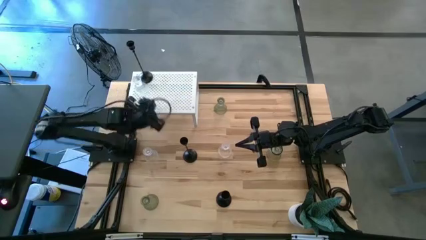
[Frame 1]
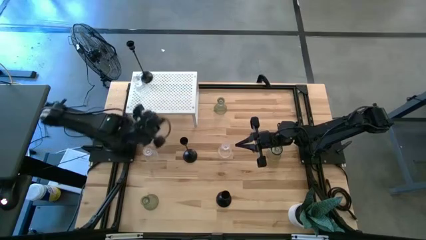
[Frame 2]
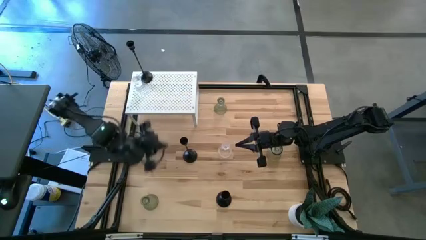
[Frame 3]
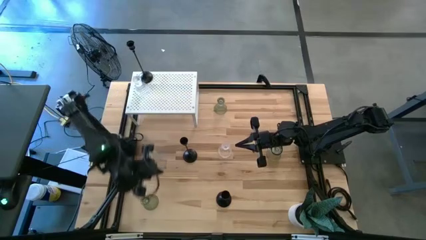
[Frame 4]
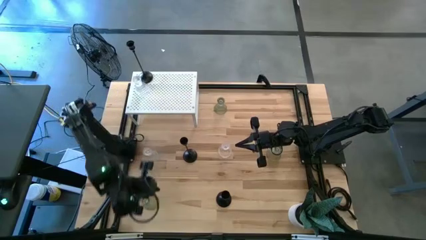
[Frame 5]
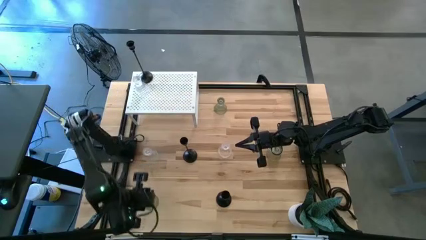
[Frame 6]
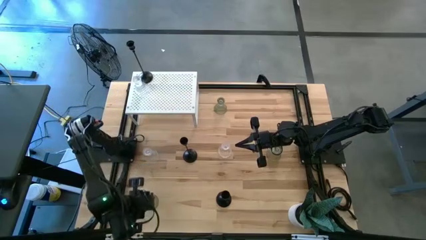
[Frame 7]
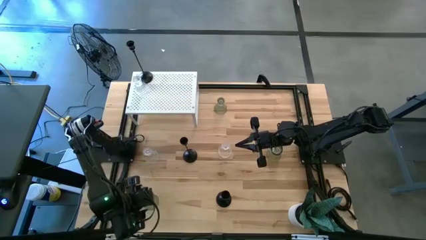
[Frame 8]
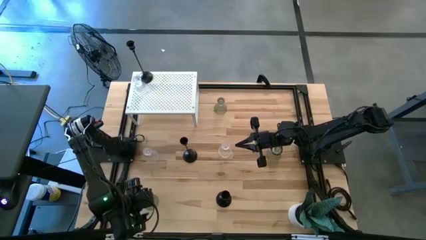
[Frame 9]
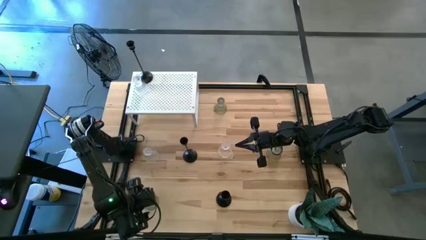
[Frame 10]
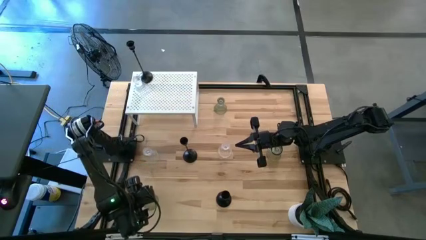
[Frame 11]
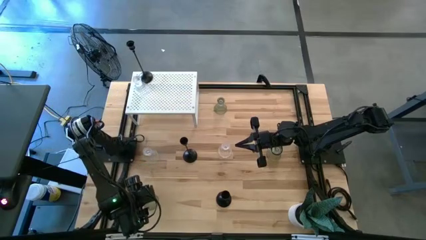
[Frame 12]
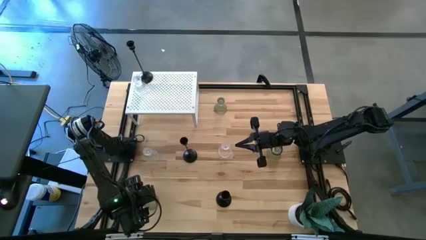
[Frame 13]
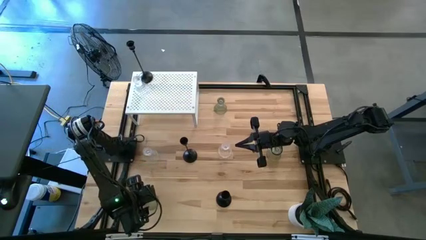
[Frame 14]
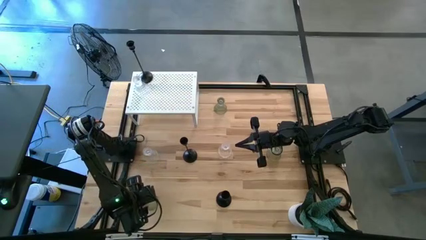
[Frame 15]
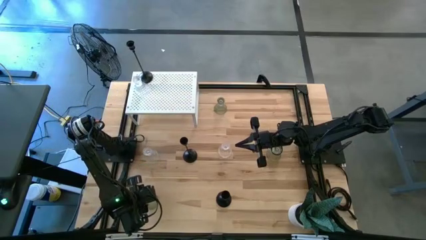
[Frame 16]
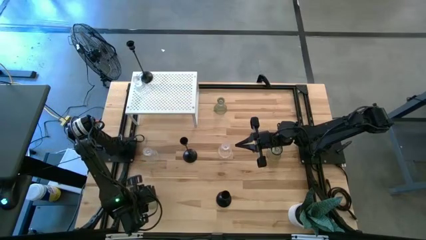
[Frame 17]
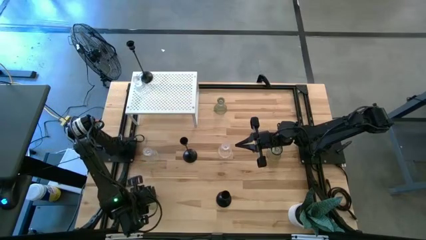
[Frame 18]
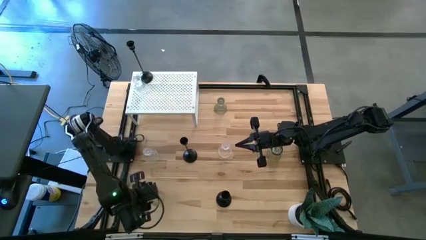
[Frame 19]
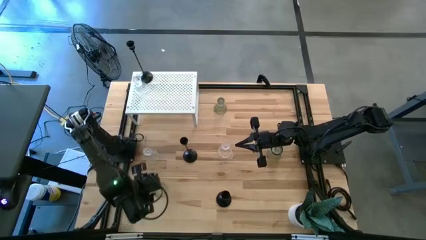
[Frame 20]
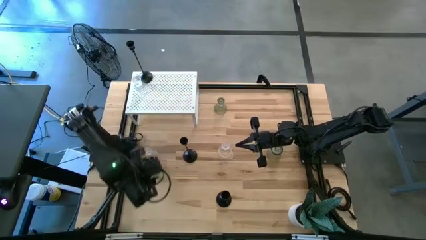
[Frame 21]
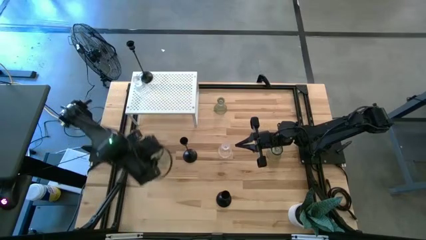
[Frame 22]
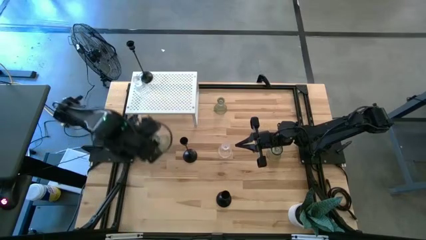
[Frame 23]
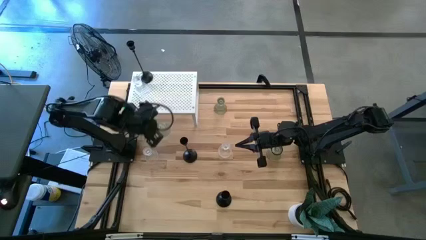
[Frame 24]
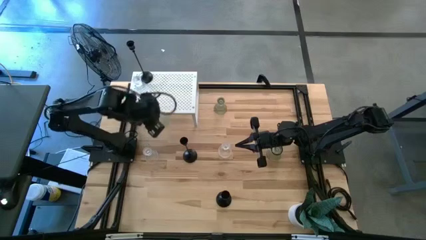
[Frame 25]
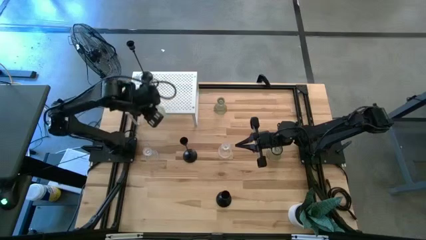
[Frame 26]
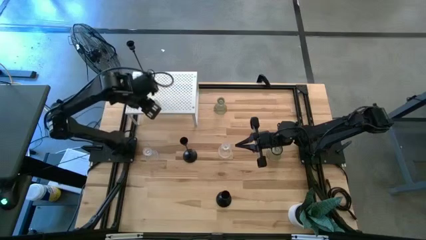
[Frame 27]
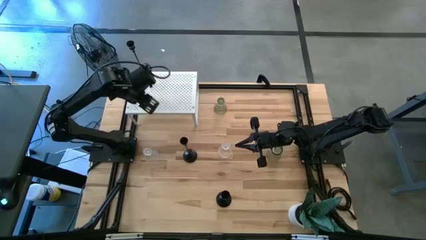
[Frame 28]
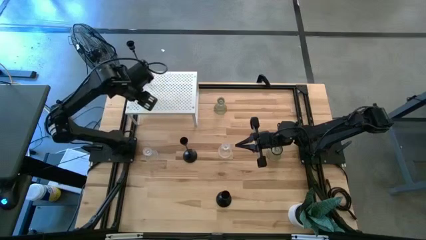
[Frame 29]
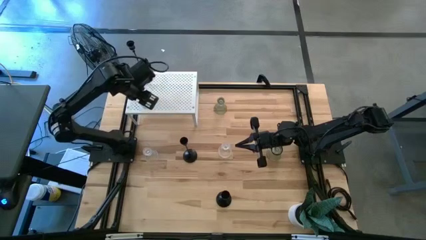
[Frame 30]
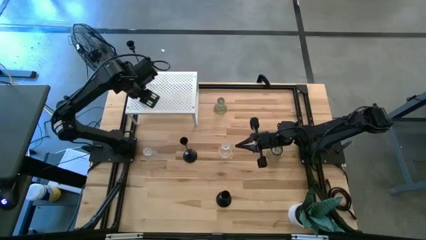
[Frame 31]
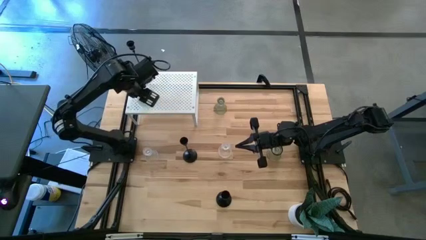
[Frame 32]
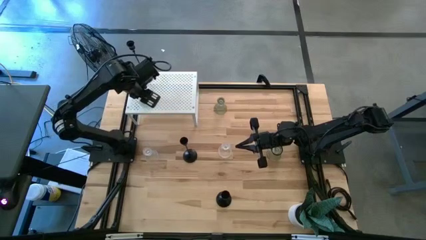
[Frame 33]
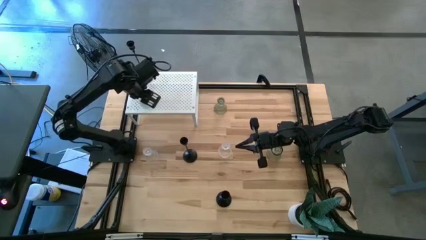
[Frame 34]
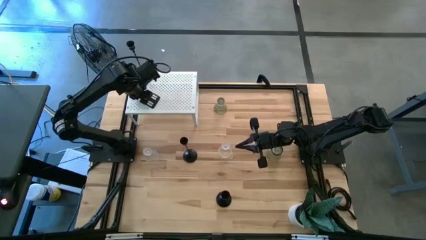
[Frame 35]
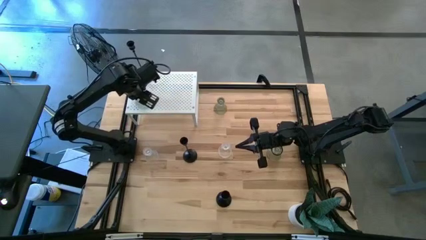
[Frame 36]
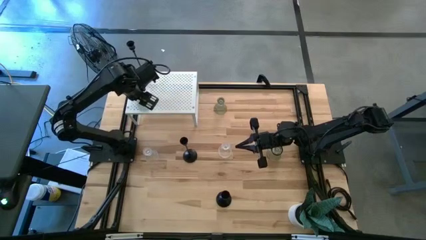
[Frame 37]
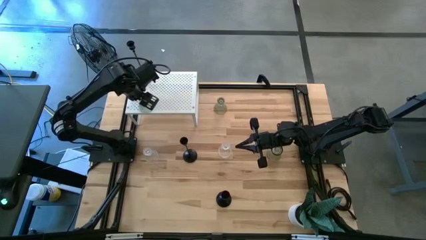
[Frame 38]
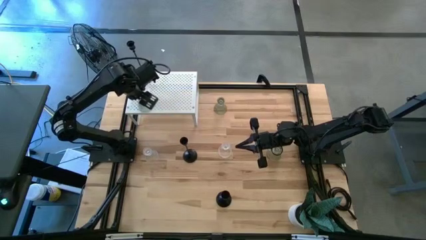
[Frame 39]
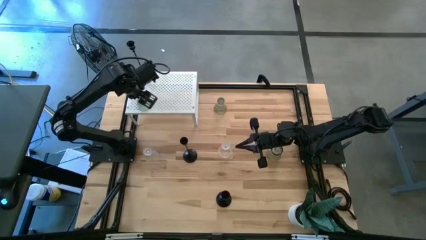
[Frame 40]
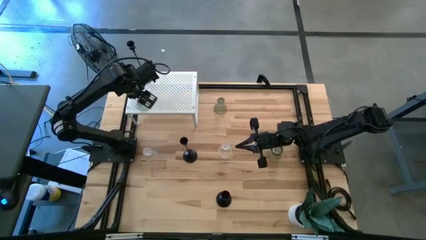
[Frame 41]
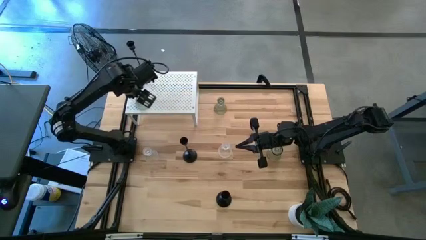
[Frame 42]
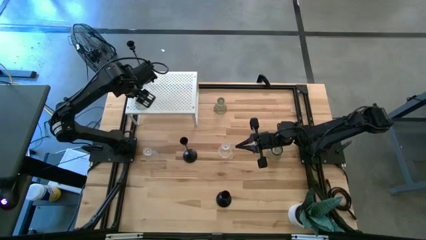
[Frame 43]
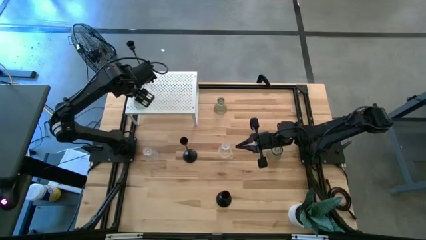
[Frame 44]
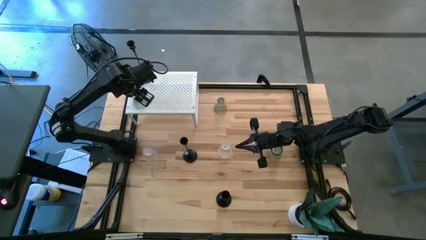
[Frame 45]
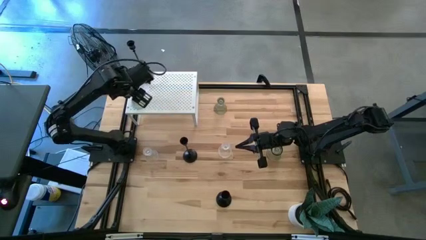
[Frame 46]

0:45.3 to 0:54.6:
Task: Pick & Place candle stick holders
Put the bottom green candle holder on the shelf

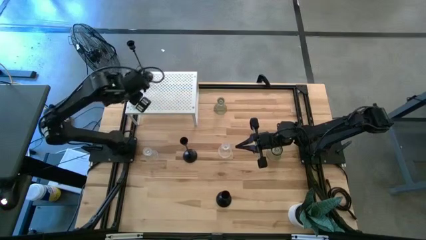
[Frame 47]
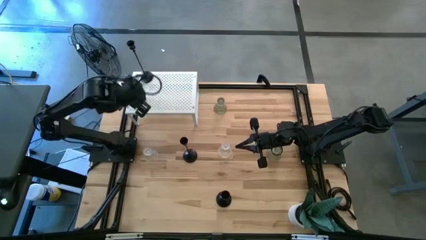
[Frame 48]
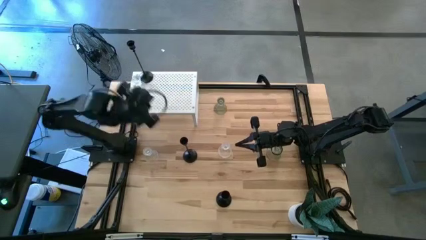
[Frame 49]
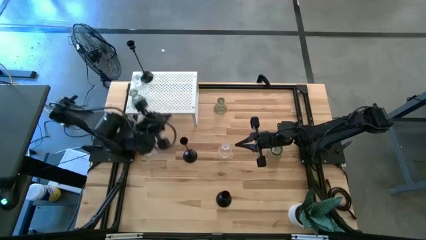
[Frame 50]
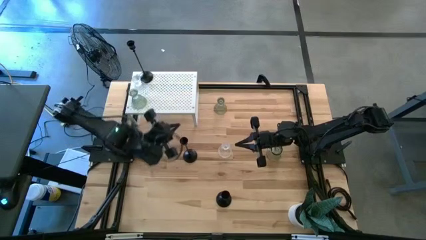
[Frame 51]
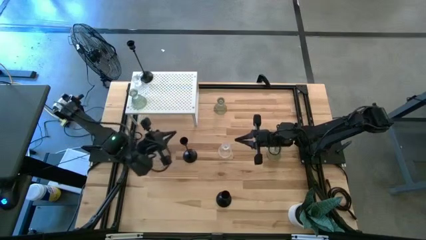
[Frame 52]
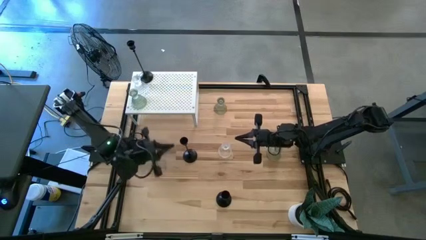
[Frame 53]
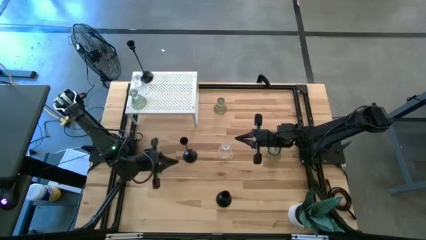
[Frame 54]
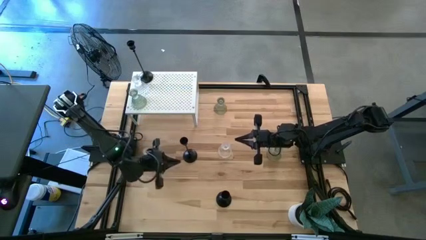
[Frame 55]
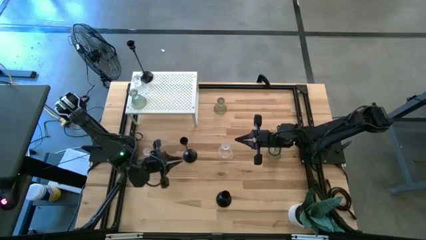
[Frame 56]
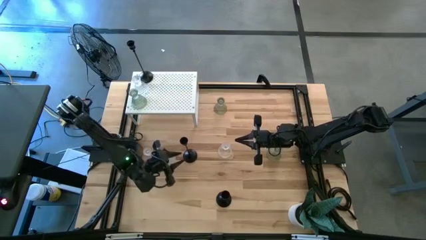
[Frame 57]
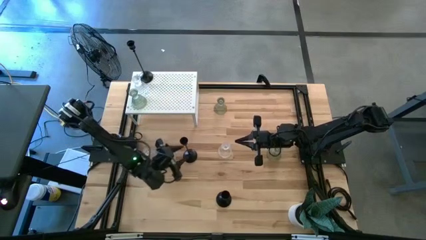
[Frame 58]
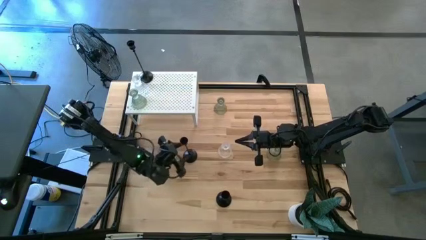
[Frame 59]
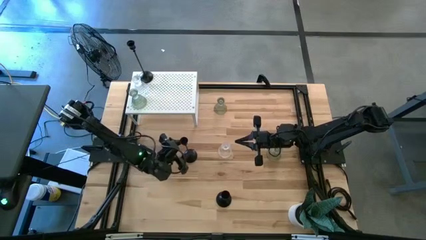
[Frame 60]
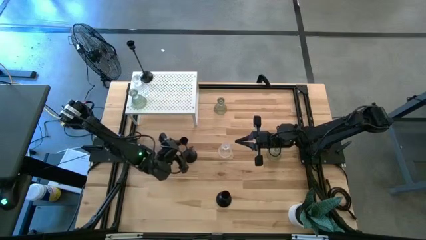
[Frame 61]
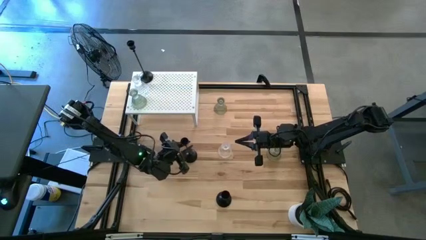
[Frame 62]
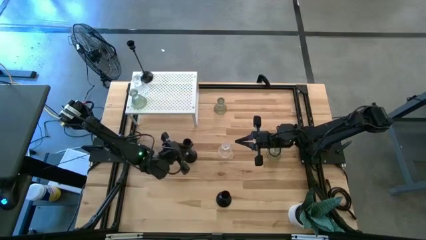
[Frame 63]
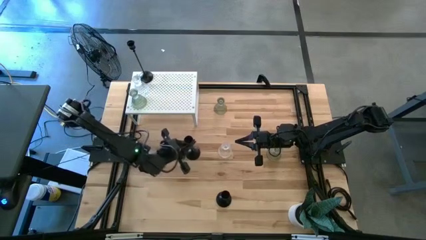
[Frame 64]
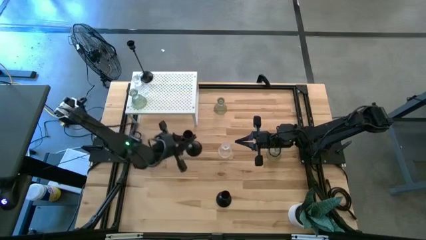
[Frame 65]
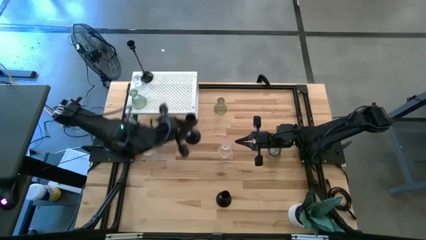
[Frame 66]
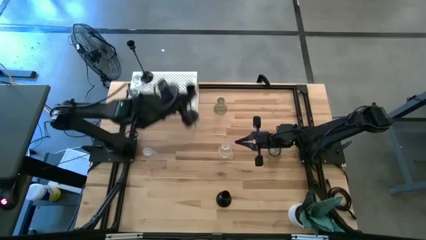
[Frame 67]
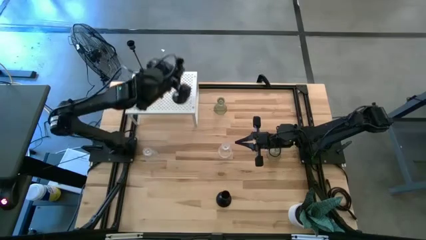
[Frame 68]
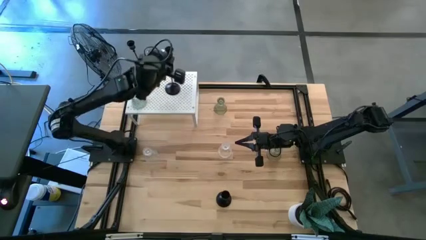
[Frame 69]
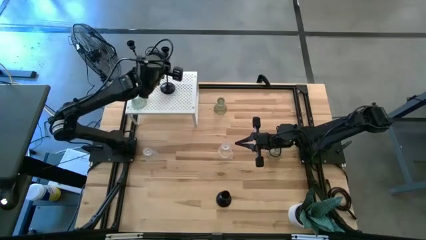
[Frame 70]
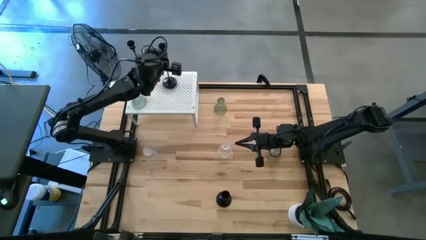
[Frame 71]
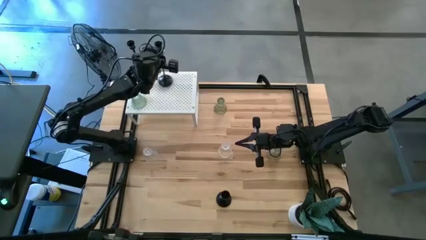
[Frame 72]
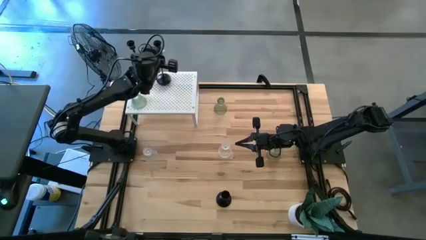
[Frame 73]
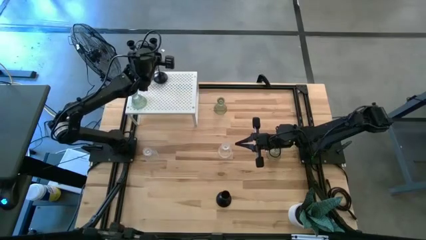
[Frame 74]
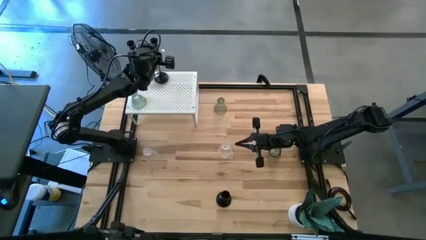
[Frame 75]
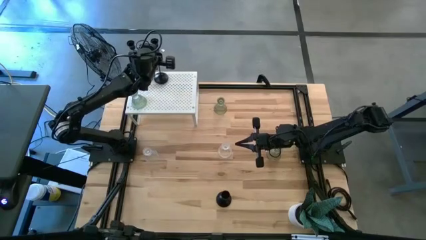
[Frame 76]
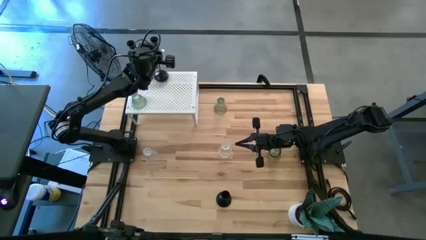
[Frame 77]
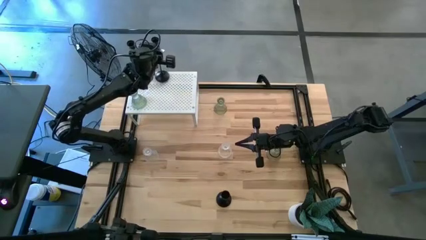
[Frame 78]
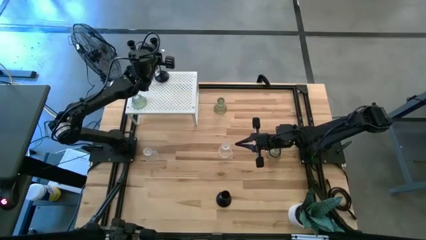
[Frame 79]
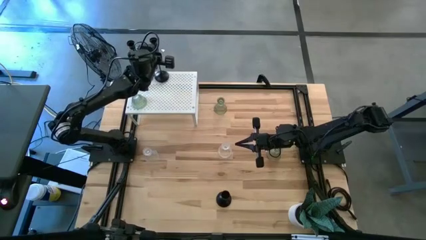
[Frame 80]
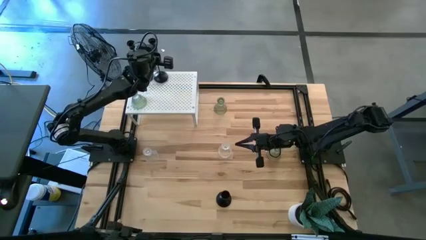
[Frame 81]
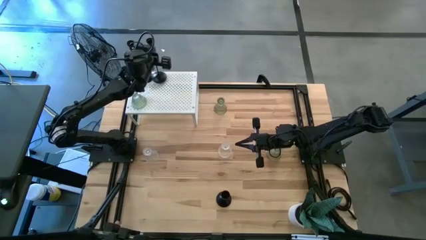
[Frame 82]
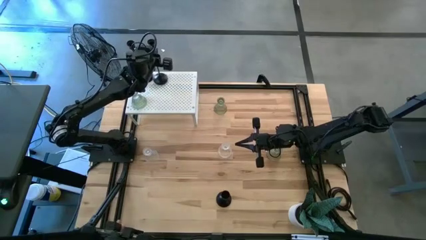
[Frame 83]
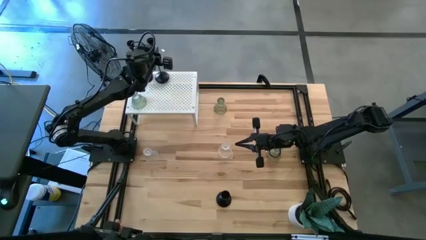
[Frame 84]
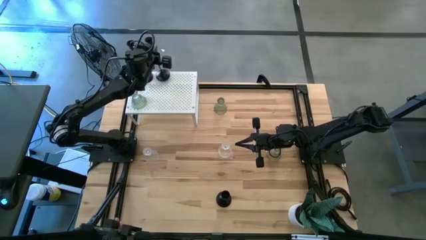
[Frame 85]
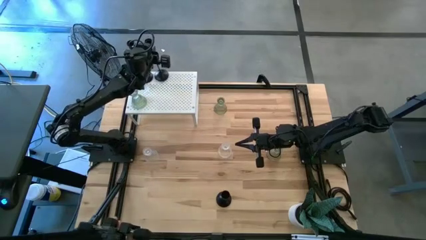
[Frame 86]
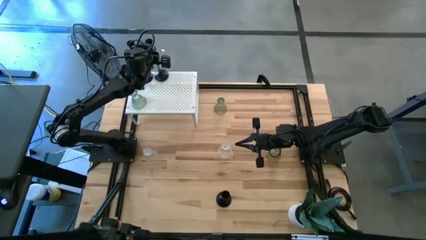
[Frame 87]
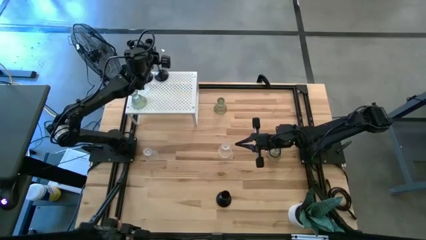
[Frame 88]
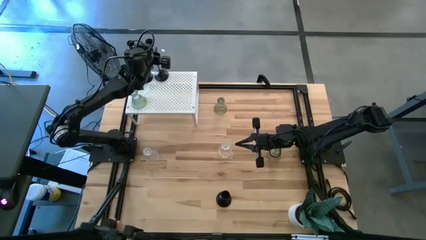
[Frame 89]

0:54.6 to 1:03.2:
Put the top black candle holder on the shelf aligned with the black candle holder
